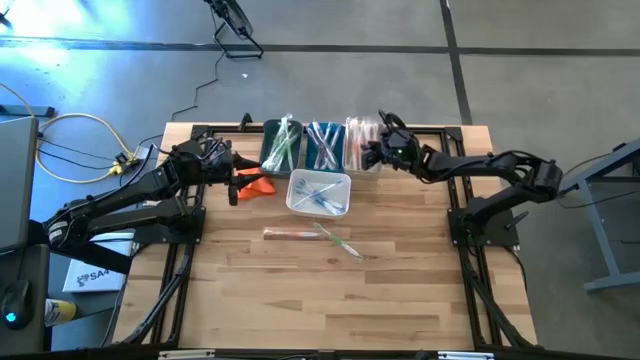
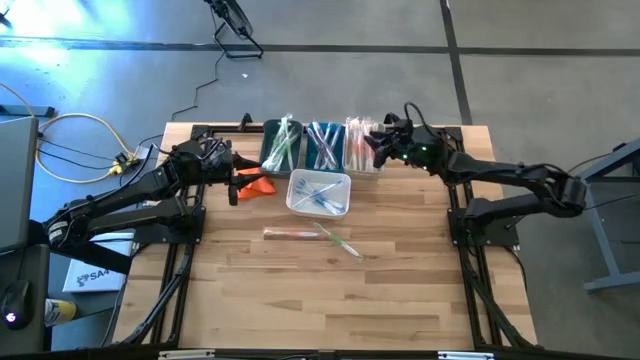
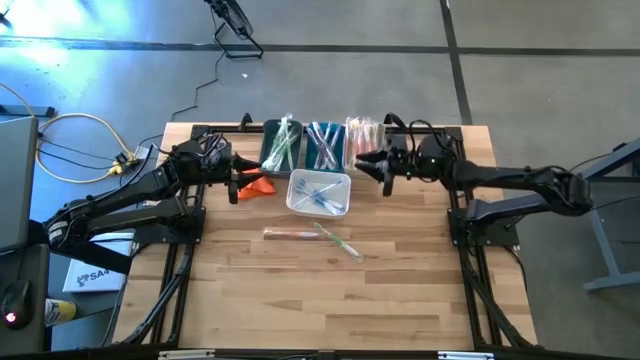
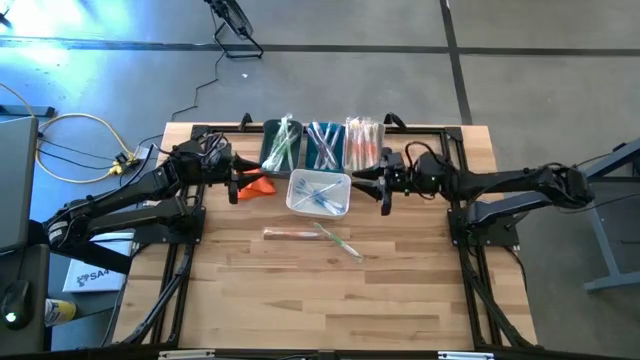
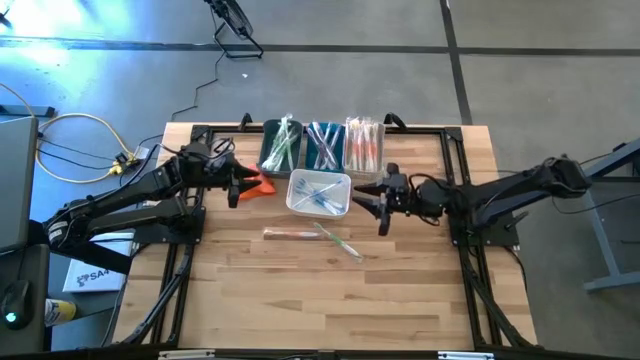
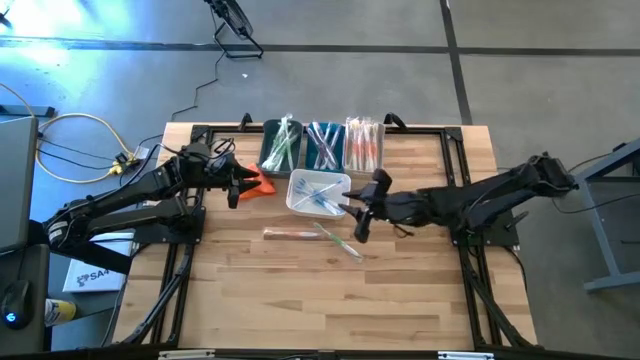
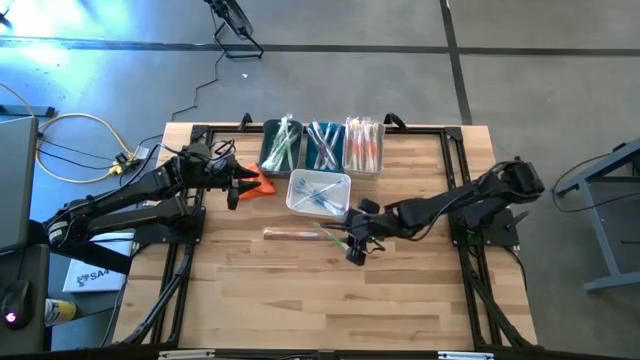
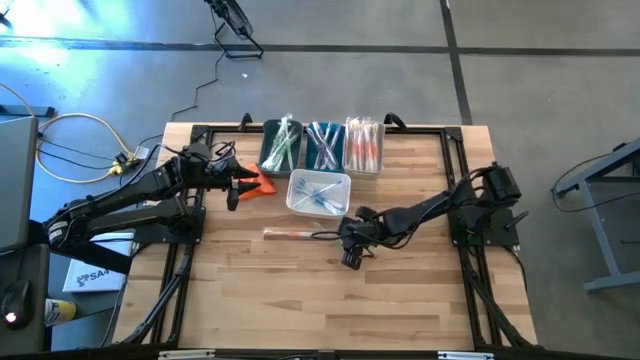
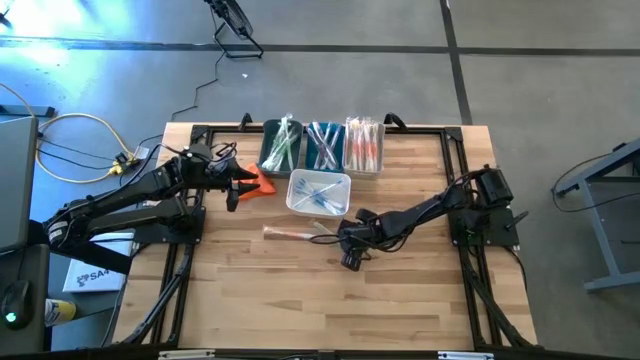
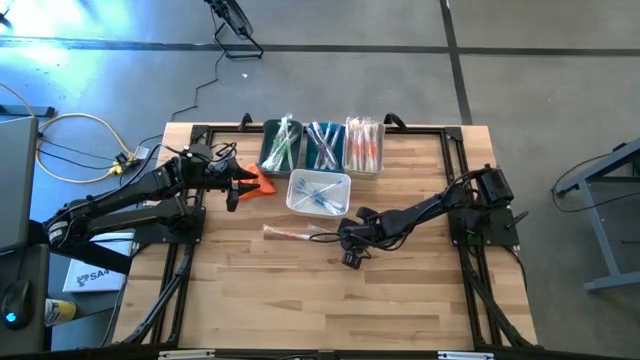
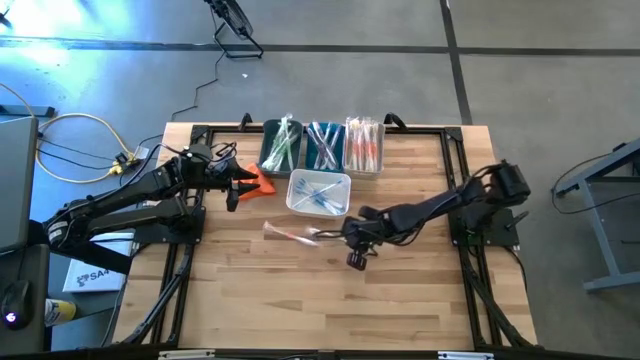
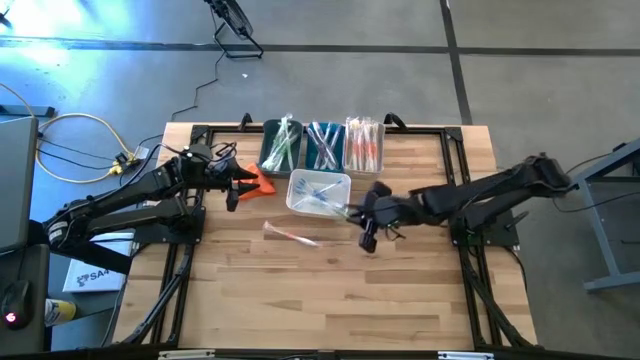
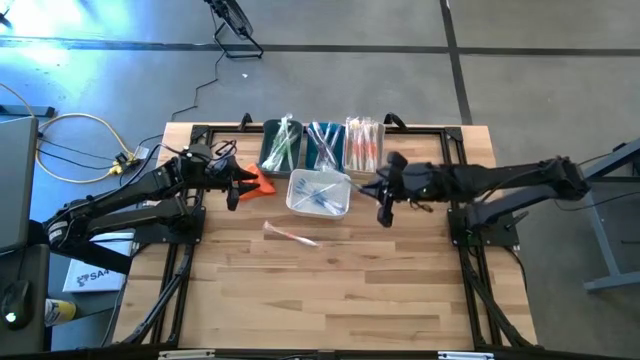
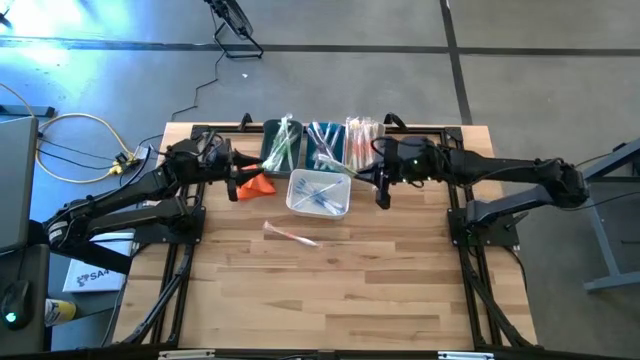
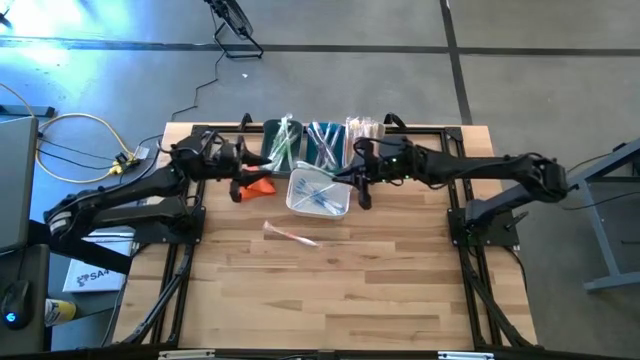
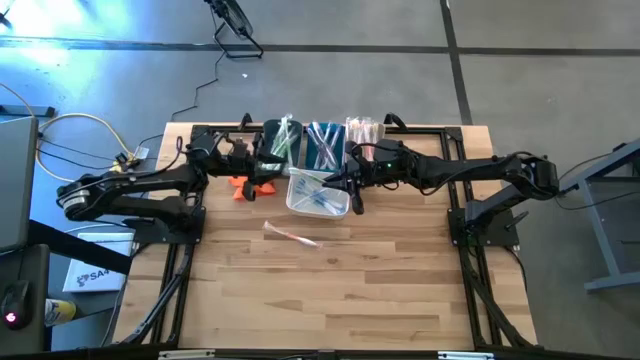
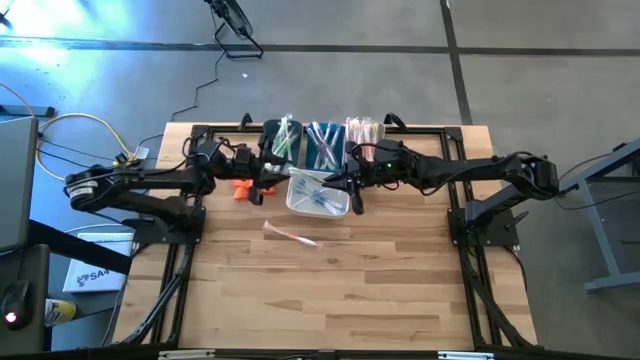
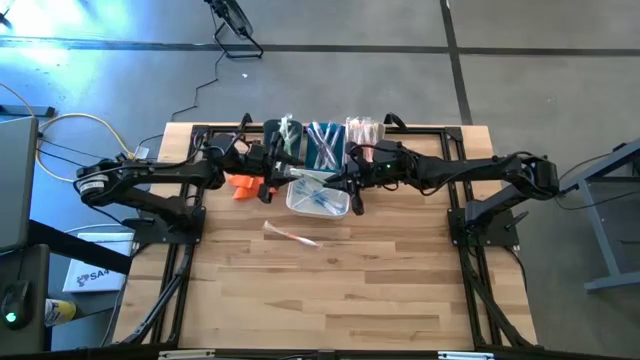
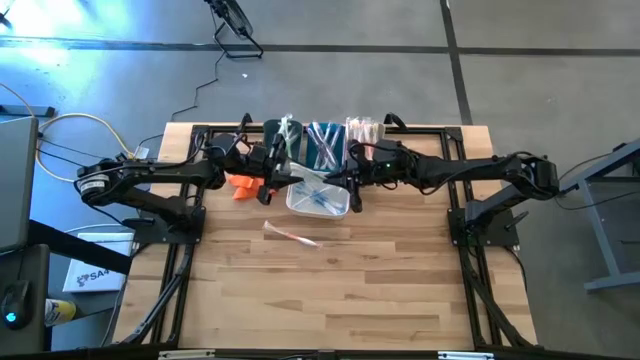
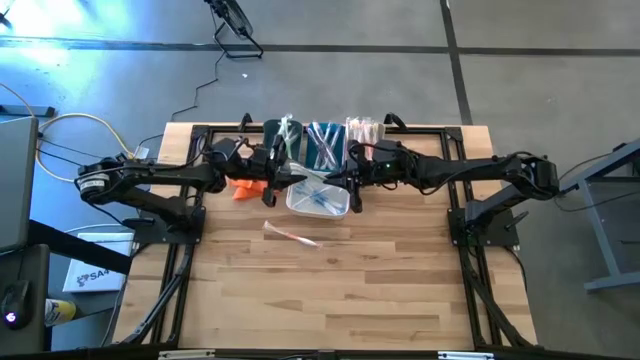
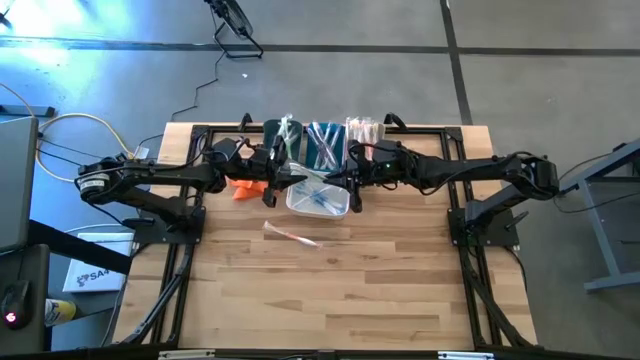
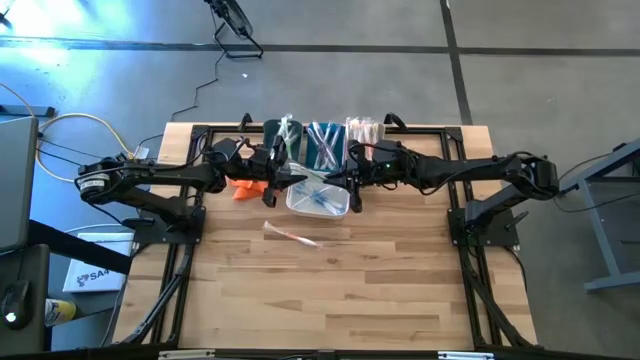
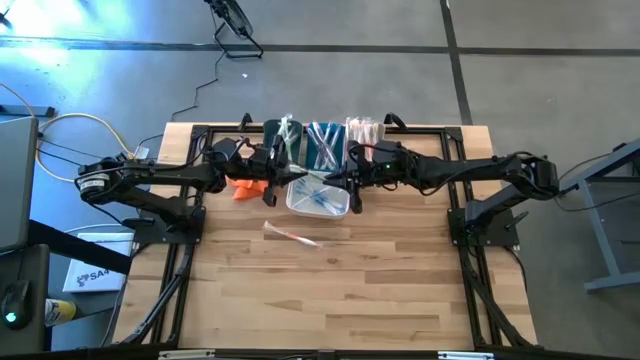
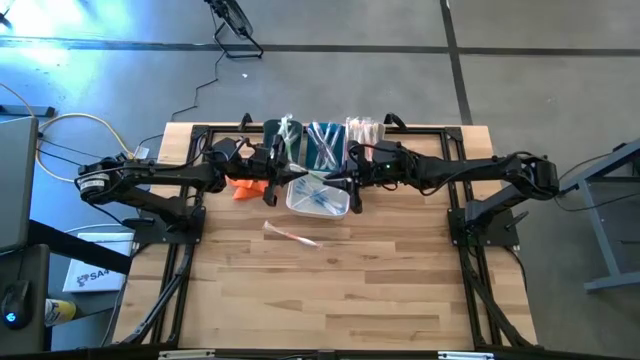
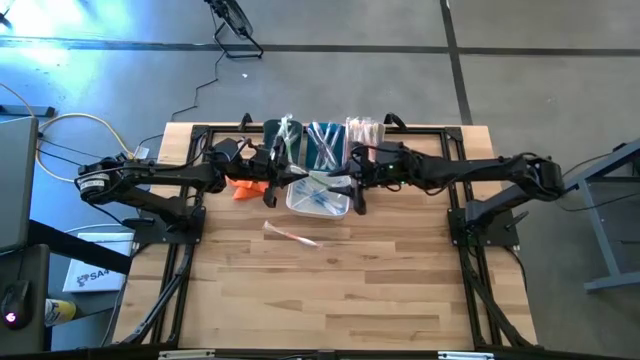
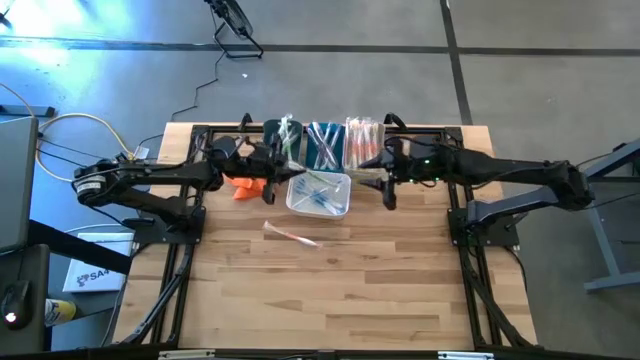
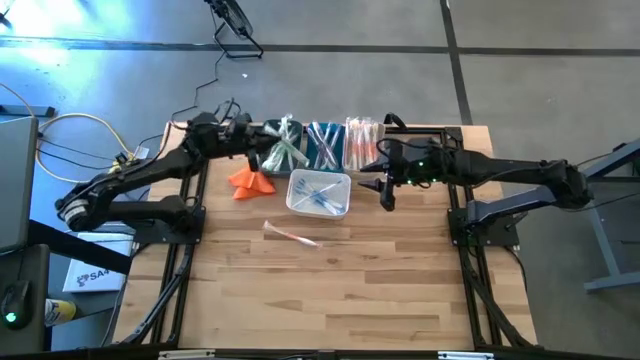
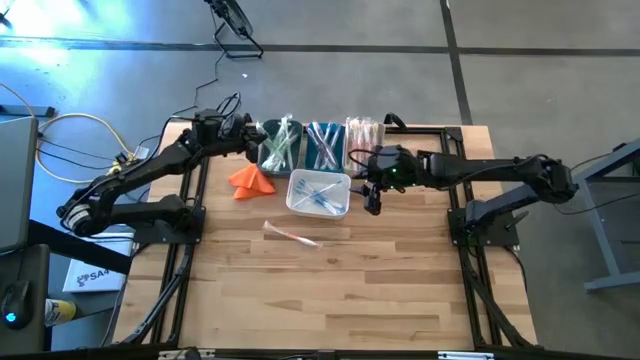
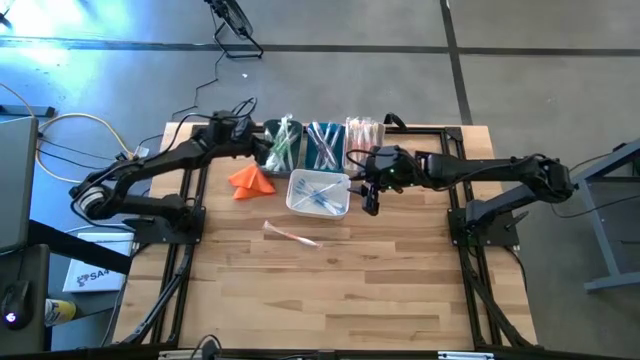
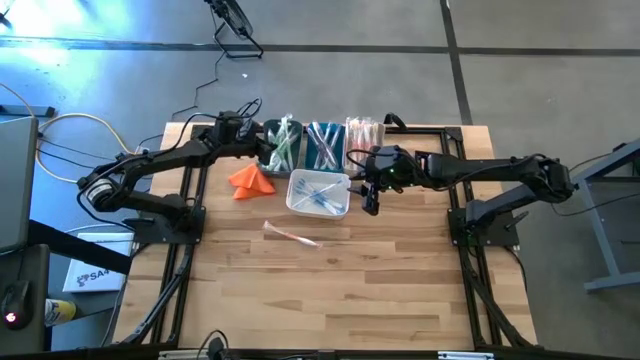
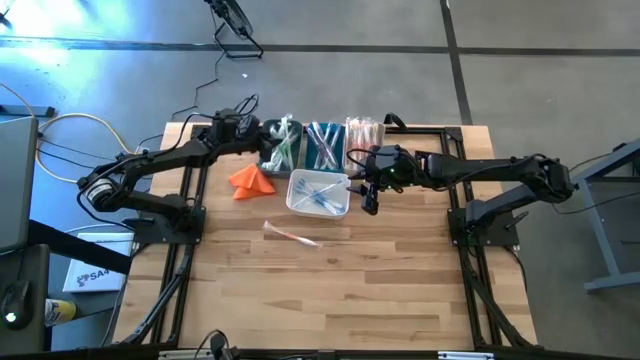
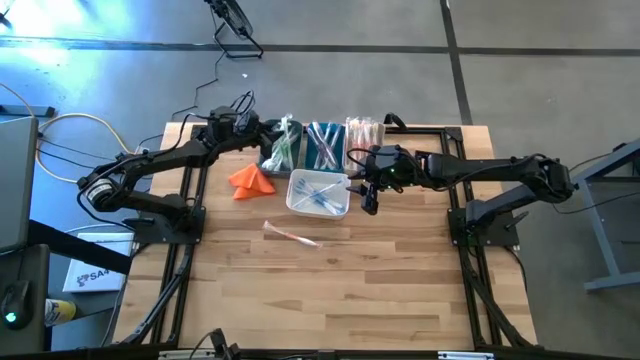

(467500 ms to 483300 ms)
Task: Pick & Place Toothbrushes
Put the green toothbrush into the dark blue bin

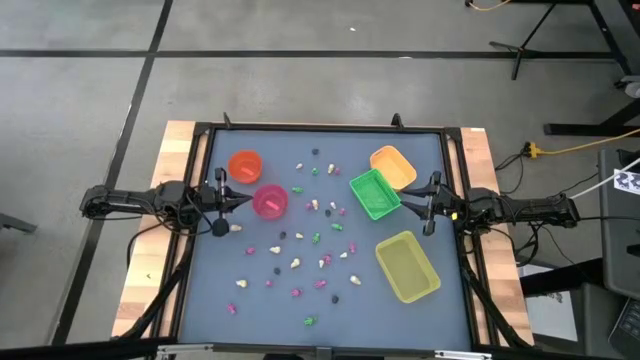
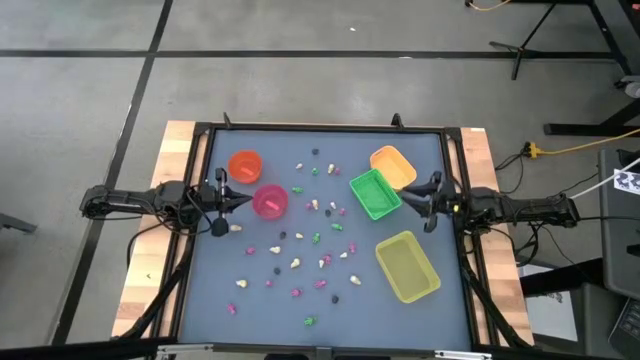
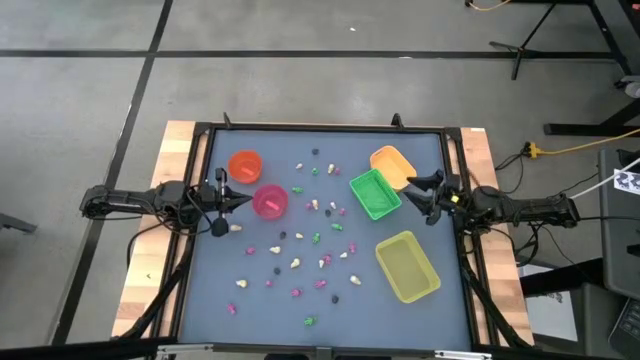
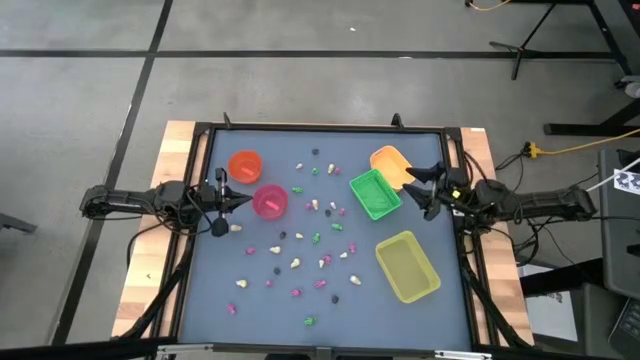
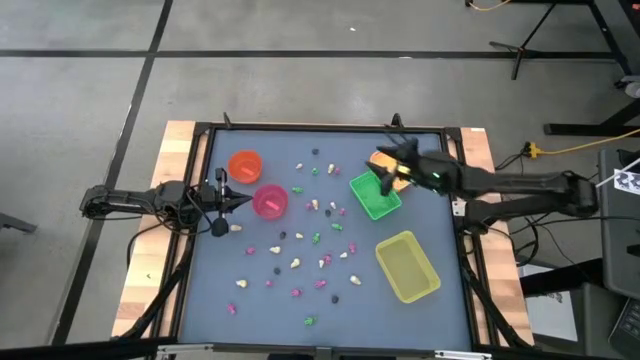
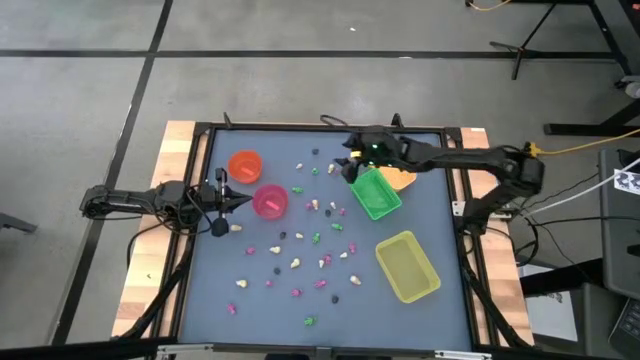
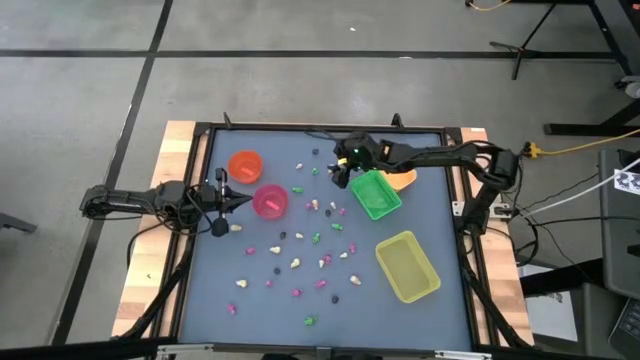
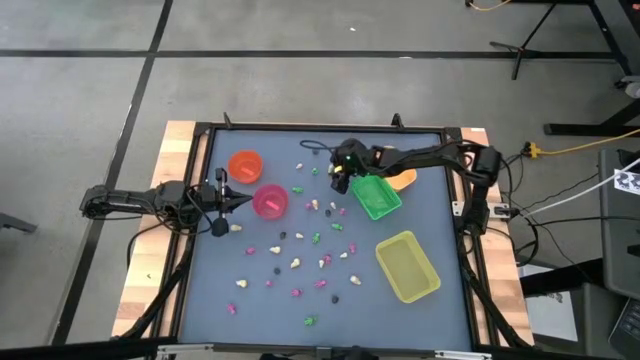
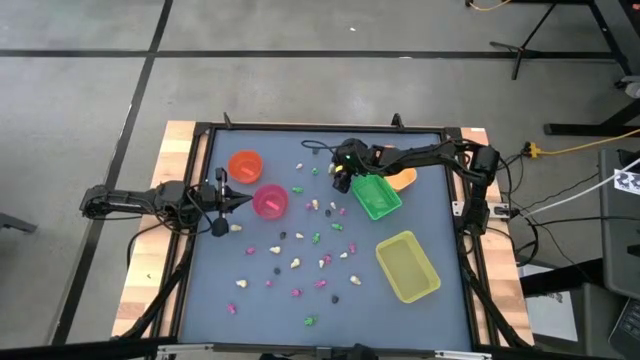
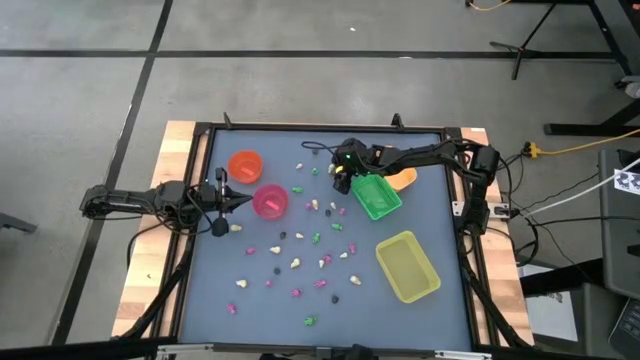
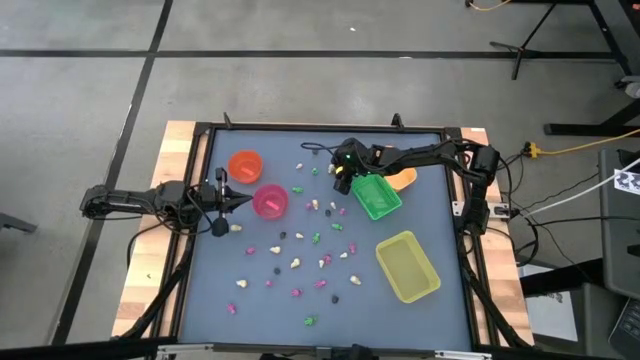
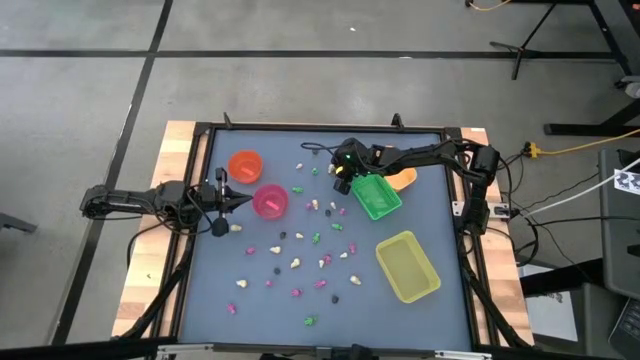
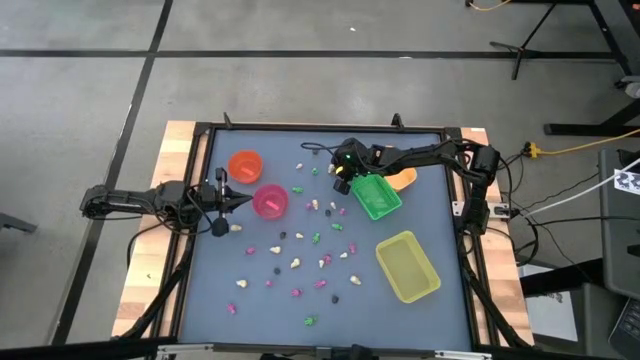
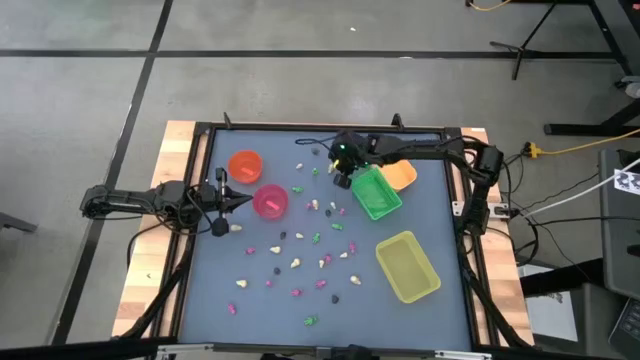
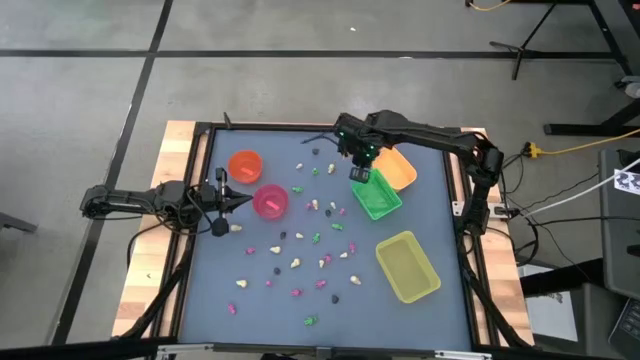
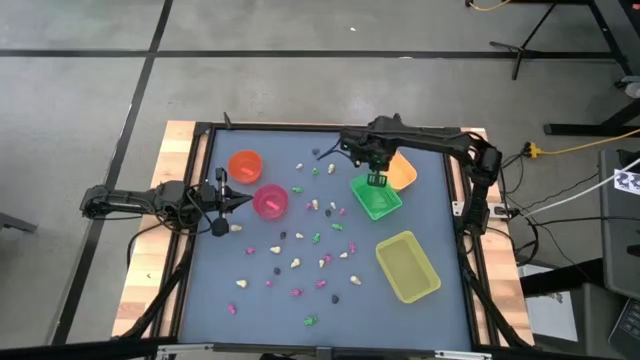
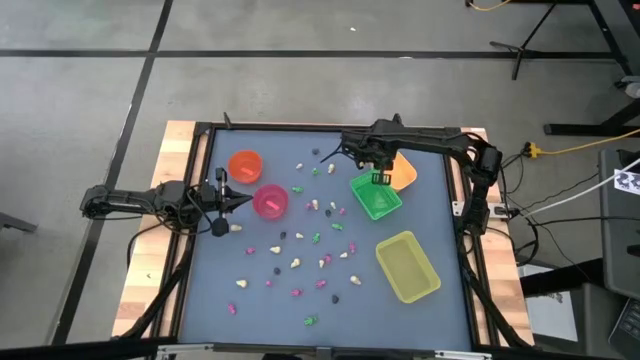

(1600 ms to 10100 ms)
Task: Sort Halloween decoration
Put the pink skeleton toy into the yellow bin
